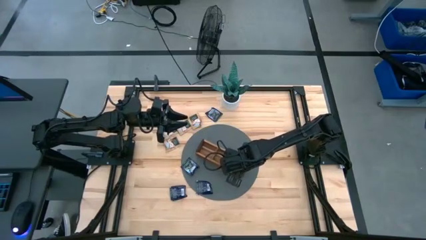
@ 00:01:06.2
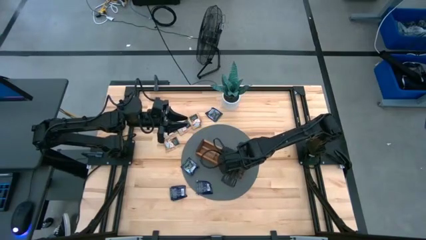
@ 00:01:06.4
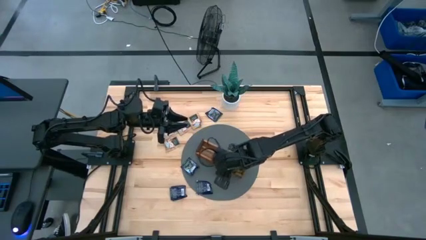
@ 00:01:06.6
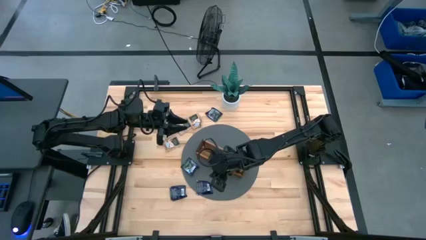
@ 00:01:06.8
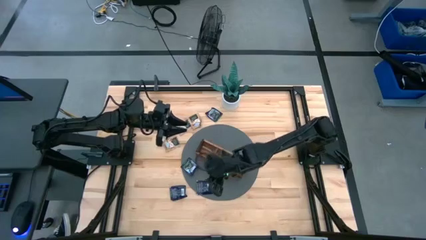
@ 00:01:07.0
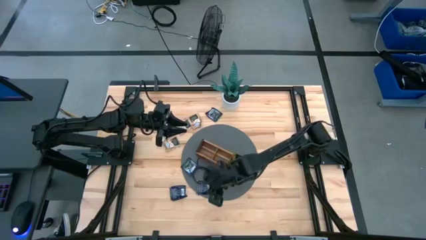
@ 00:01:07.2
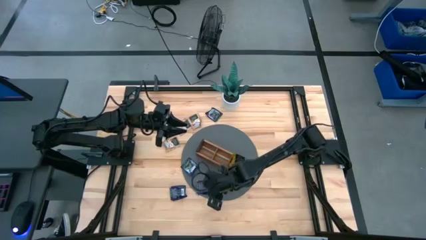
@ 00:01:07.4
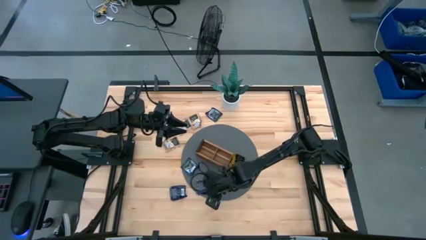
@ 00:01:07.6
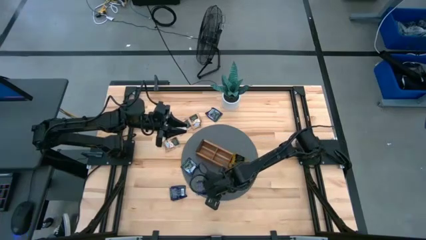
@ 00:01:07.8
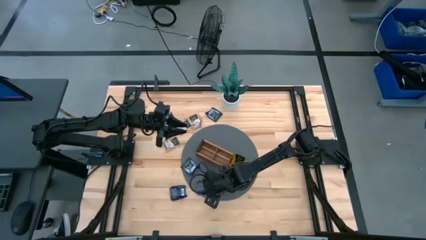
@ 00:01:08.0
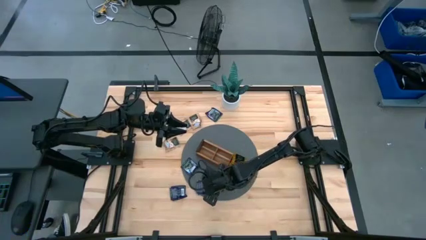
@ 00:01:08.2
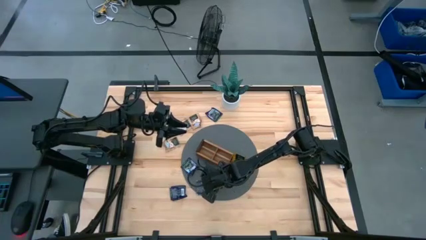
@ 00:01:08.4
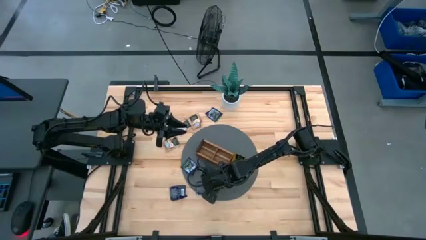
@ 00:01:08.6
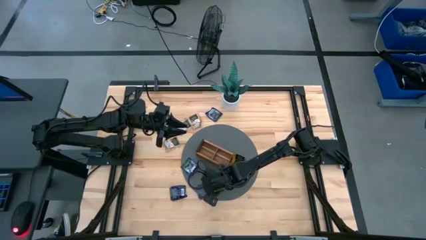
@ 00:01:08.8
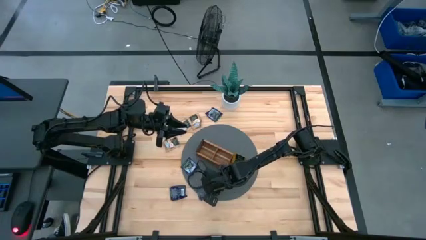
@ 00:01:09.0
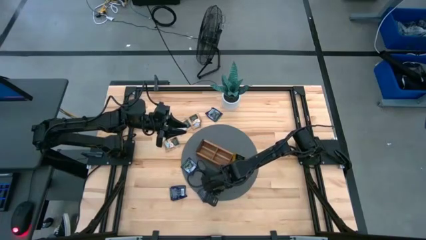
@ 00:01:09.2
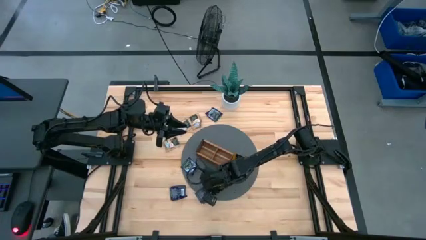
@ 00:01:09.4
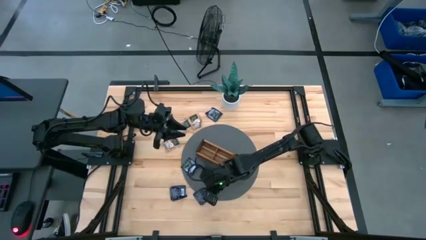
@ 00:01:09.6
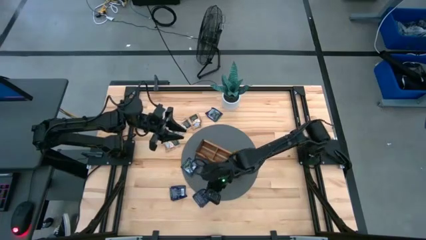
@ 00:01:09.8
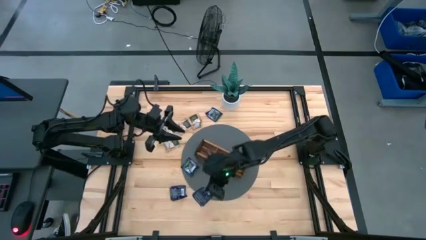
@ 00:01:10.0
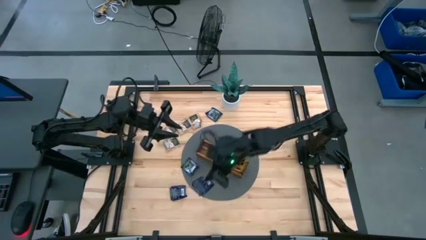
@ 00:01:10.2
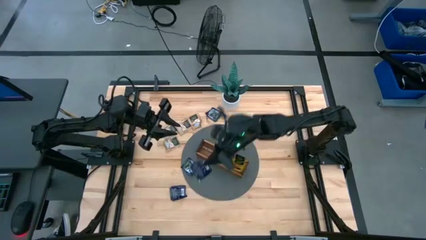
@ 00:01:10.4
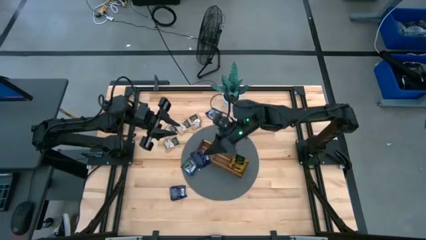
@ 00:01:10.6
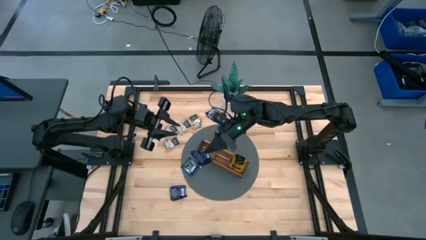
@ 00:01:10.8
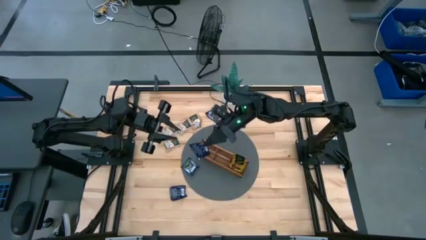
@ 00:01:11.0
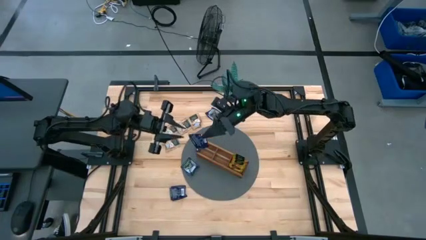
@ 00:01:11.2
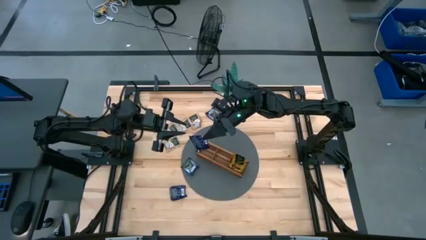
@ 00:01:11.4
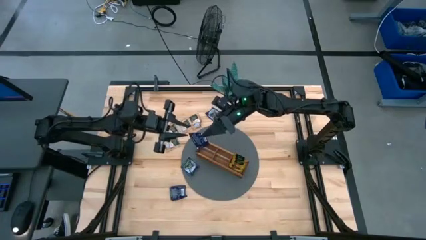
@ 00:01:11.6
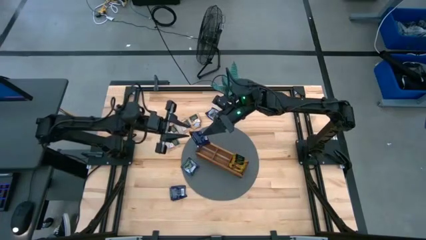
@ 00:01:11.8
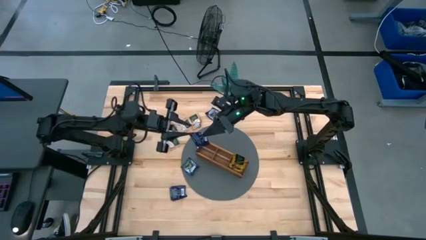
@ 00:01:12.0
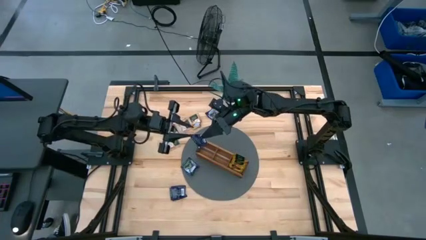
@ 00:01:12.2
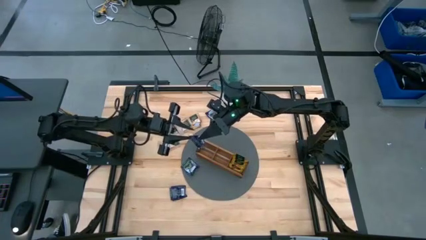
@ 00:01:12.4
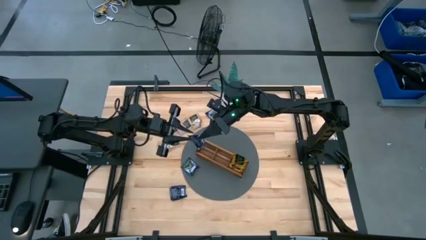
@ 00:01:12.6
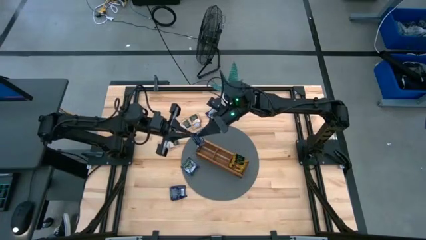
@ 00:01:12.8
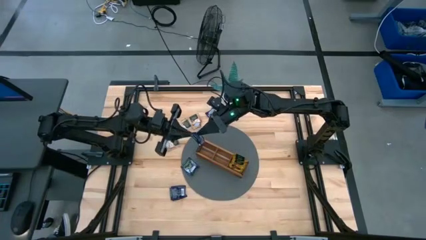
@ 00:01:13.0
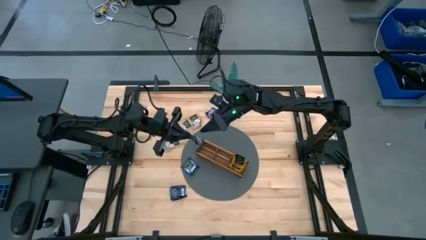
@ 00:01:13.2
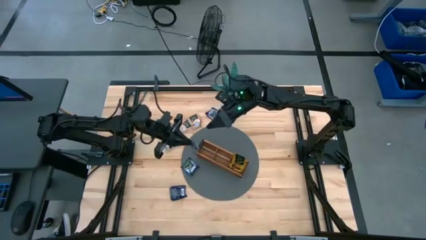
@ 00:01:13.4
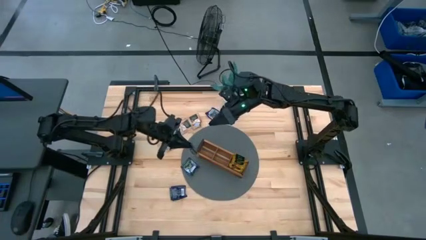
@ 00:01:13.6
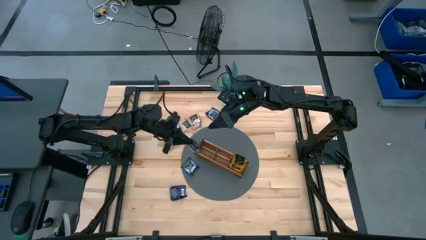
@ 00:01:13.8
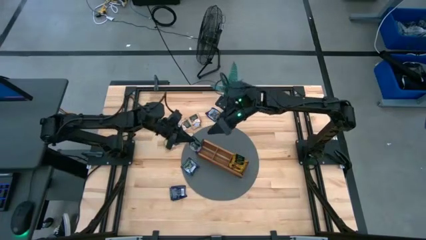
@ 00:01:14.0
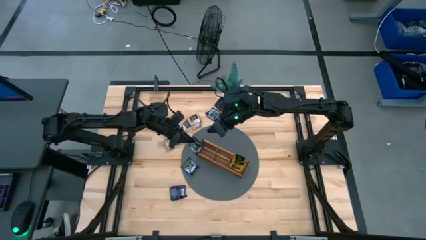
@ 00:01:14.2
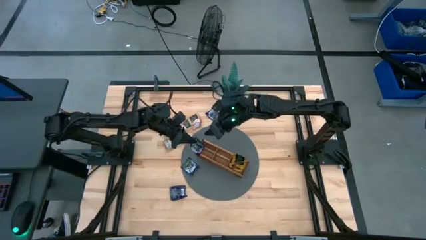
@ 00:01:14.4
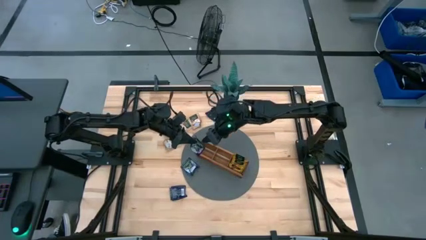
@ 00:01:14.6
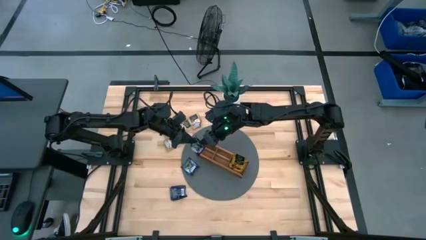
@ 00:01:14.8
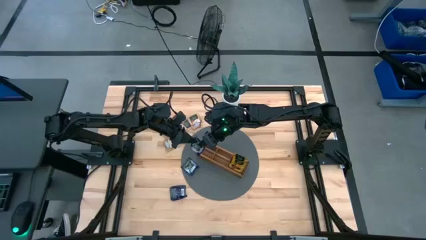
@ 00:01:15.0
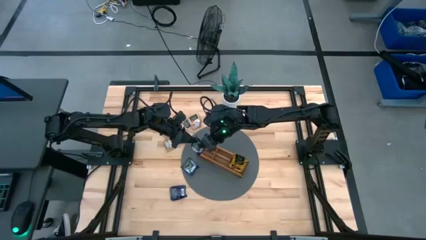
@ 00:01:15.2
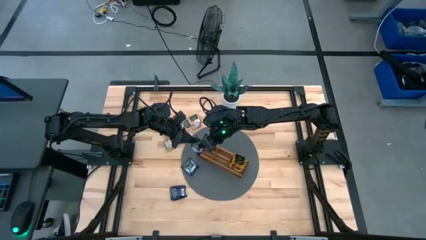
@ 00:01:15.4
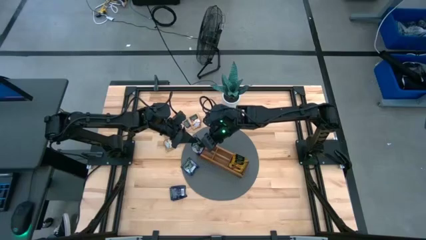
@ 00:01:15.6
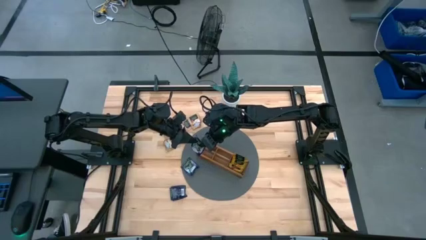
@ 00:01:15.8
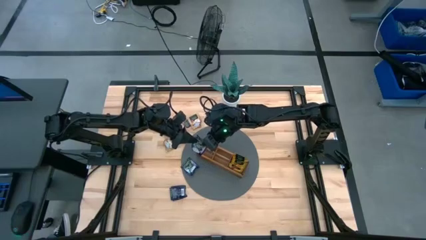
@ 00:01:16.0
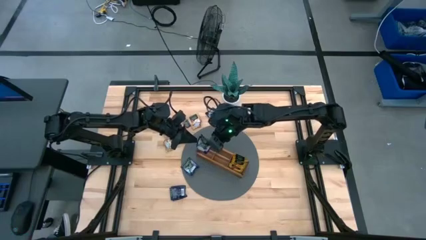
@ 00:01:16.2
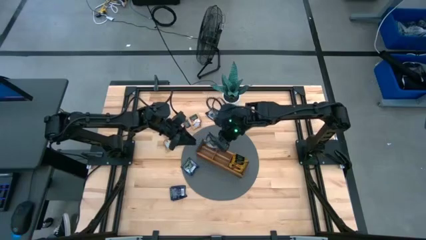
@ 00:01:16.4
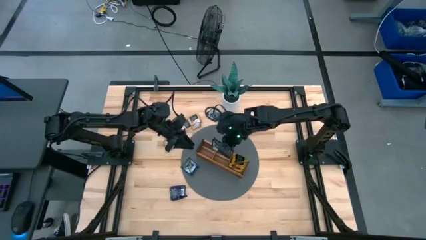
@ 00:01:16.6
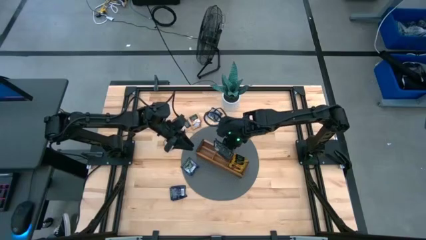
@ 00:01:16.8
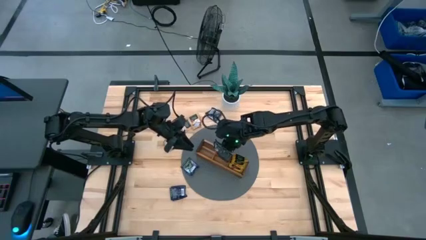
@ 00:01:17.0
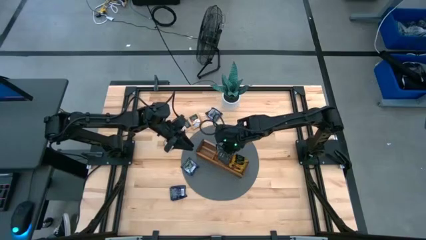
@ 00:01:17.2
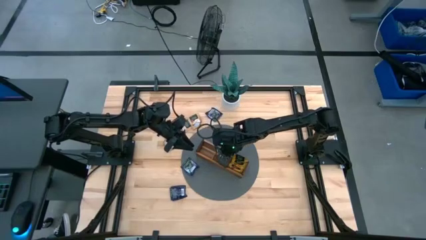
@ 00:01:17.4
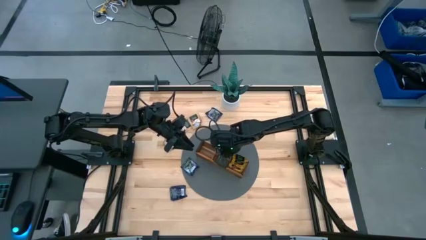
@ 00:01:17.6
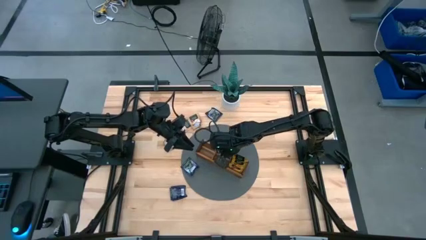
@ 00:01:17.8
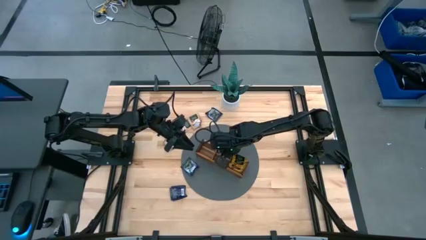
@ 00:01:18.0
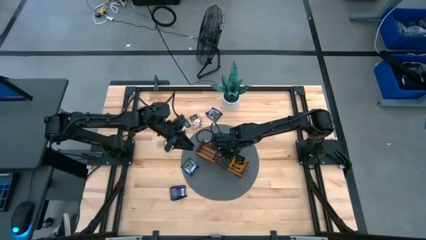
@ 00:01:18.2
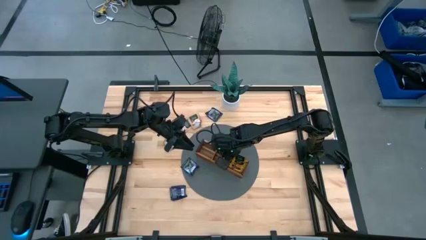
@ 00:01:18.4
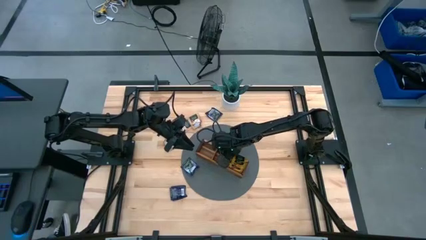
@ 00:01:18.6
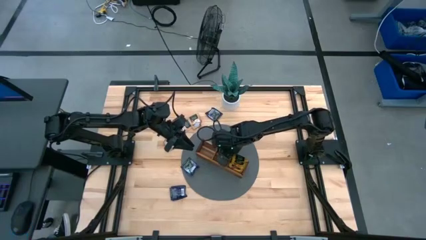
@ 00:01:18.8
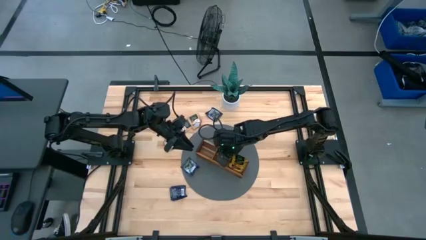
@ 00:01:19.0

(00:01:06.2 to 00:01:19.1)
Task: Pick & Place Tea
Put the violet tea bag into the middle section of the wooden organizer
